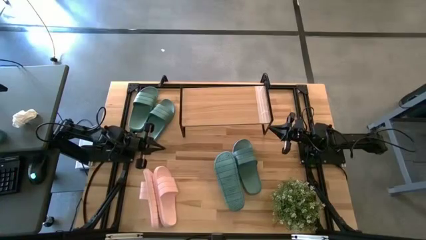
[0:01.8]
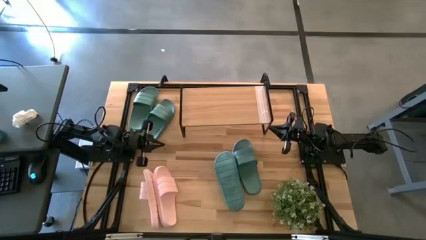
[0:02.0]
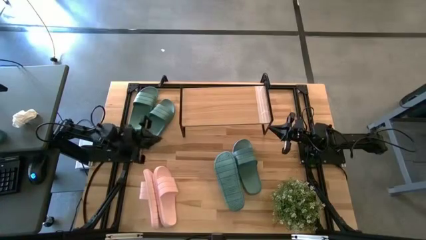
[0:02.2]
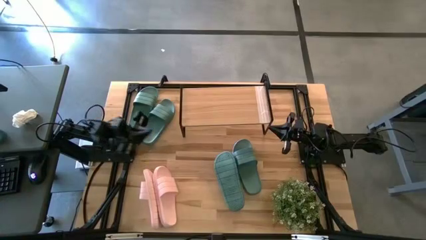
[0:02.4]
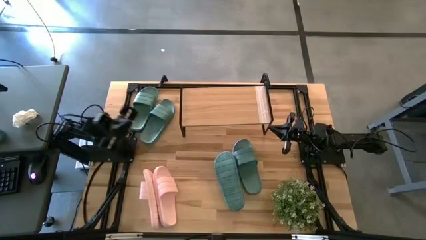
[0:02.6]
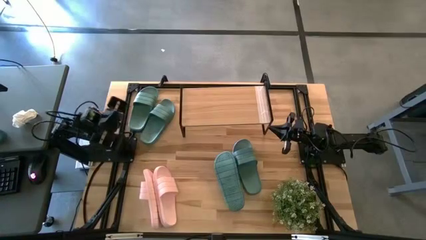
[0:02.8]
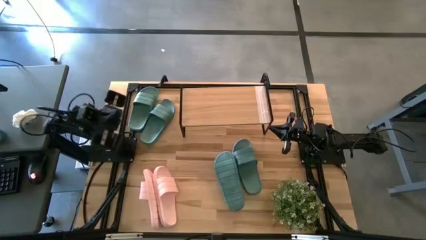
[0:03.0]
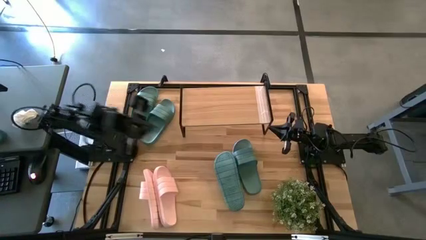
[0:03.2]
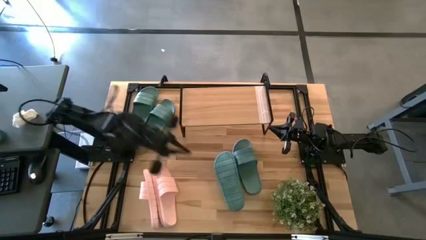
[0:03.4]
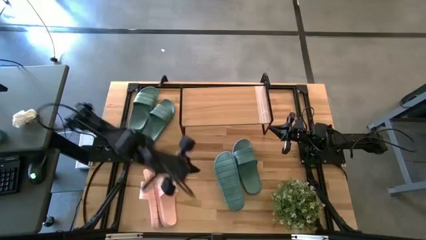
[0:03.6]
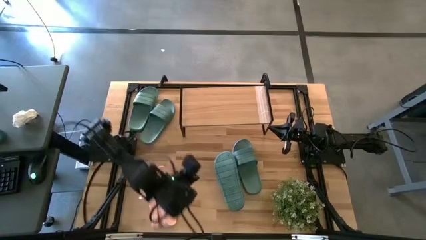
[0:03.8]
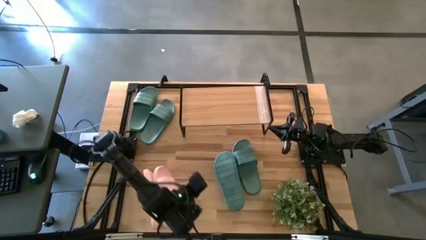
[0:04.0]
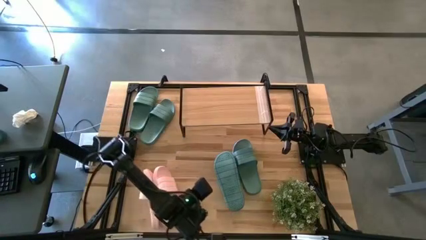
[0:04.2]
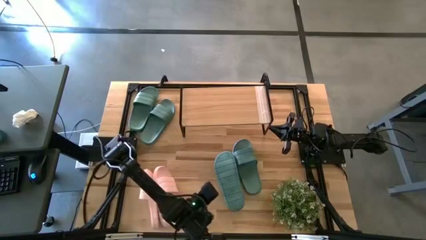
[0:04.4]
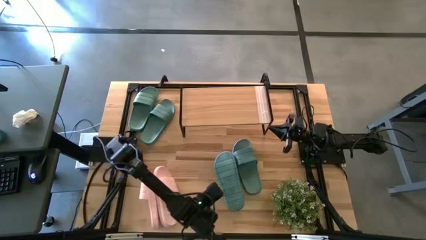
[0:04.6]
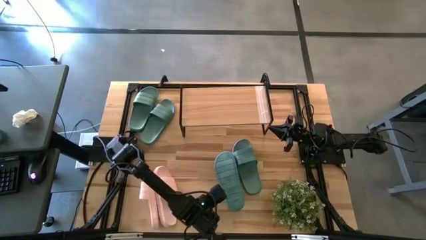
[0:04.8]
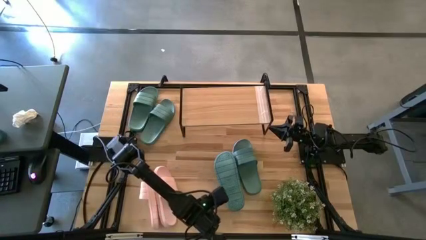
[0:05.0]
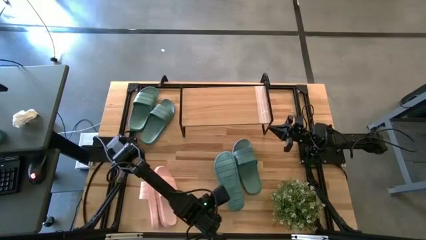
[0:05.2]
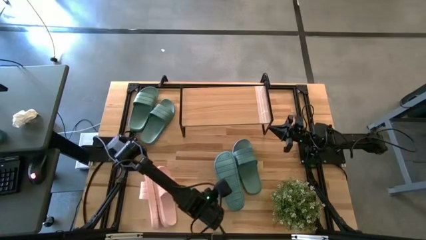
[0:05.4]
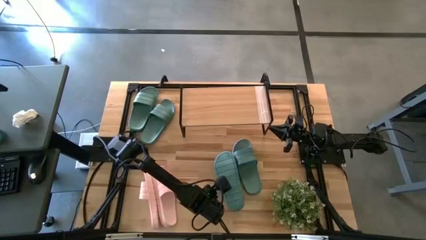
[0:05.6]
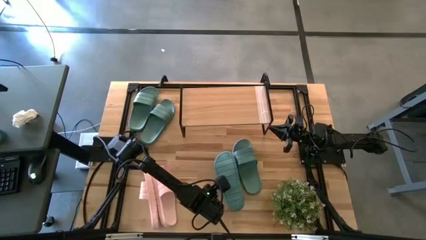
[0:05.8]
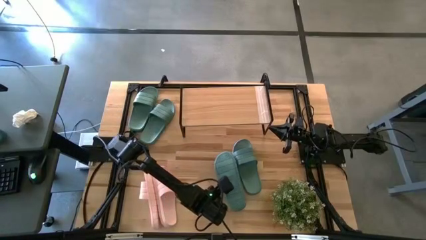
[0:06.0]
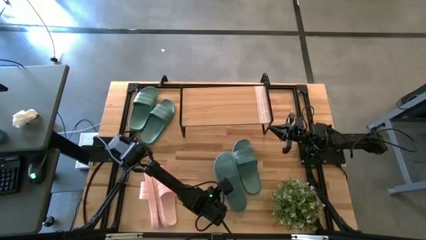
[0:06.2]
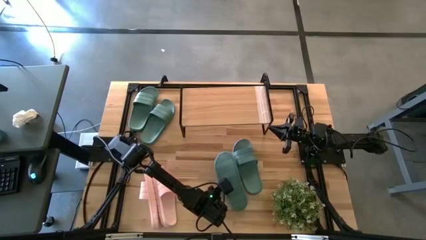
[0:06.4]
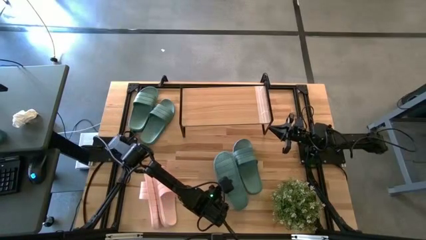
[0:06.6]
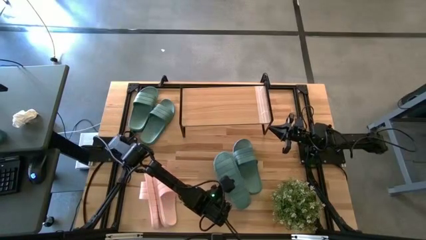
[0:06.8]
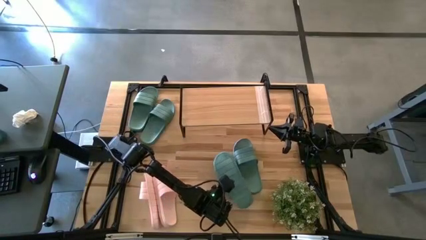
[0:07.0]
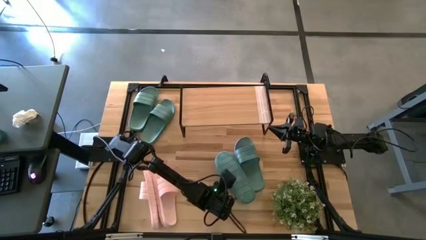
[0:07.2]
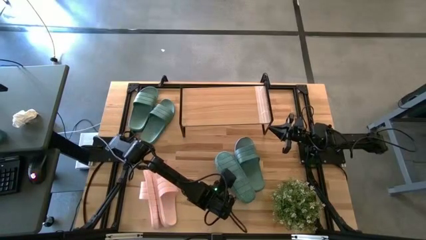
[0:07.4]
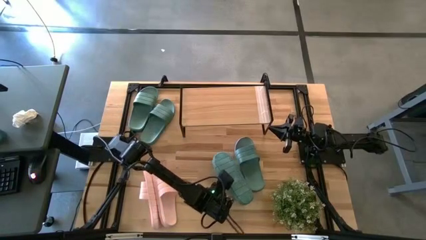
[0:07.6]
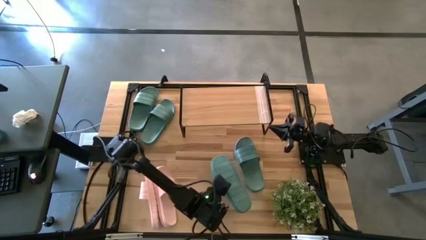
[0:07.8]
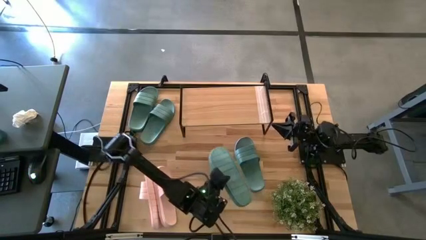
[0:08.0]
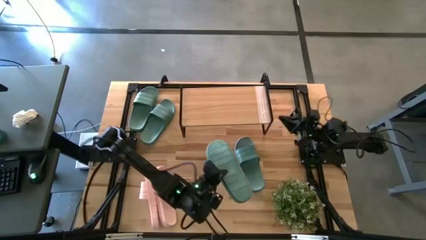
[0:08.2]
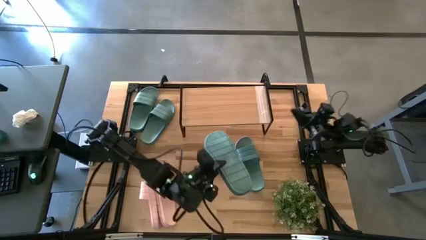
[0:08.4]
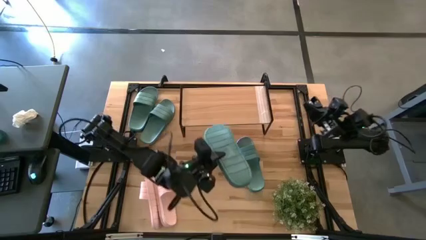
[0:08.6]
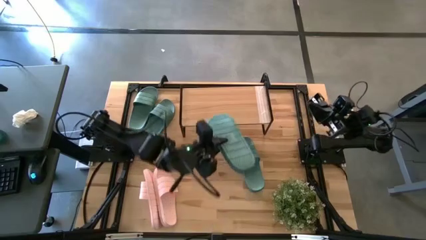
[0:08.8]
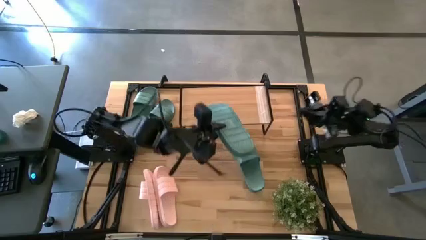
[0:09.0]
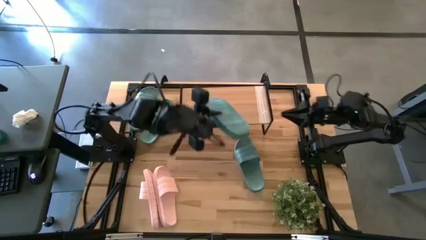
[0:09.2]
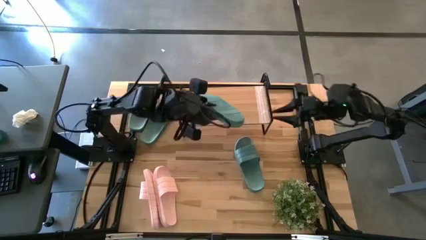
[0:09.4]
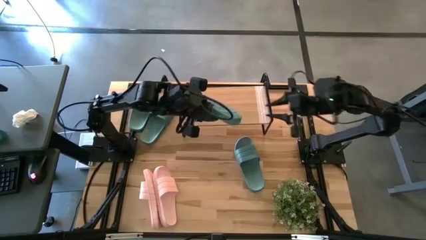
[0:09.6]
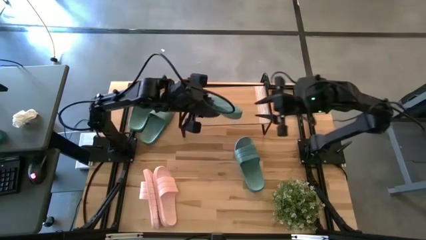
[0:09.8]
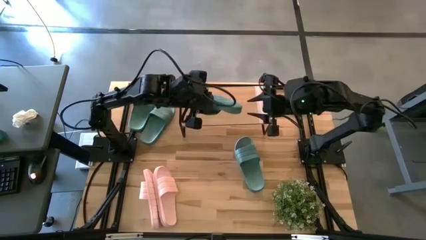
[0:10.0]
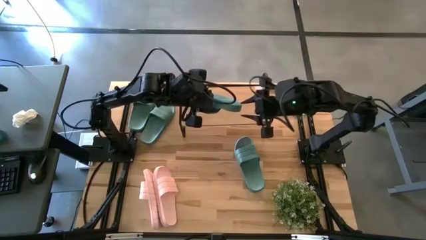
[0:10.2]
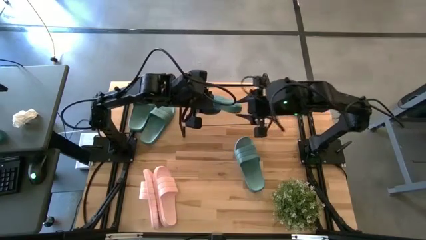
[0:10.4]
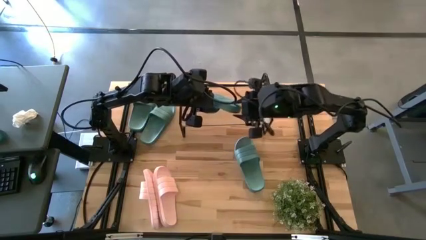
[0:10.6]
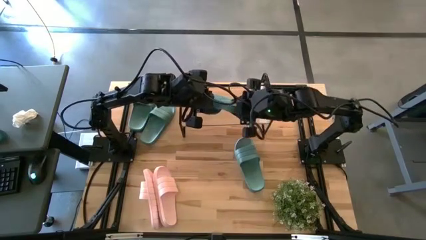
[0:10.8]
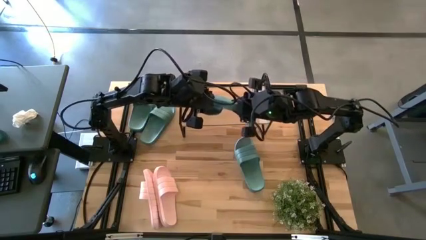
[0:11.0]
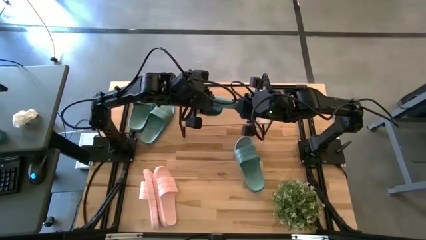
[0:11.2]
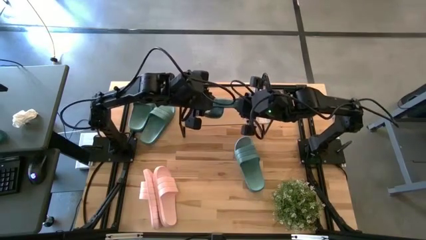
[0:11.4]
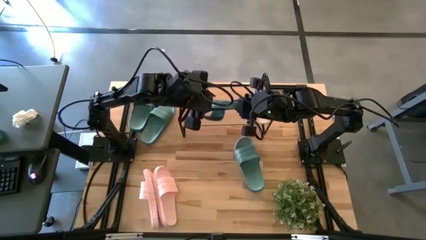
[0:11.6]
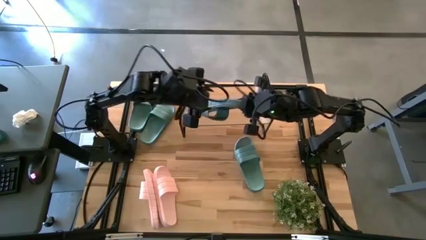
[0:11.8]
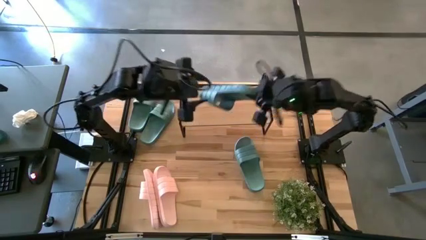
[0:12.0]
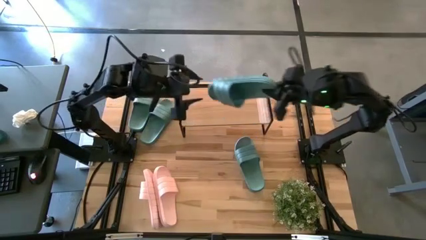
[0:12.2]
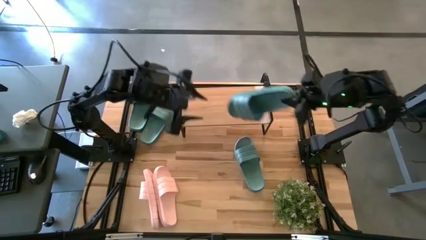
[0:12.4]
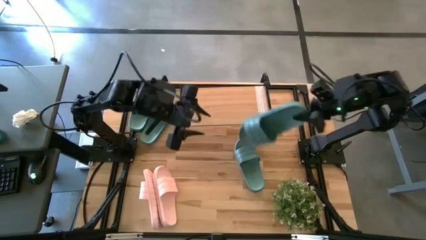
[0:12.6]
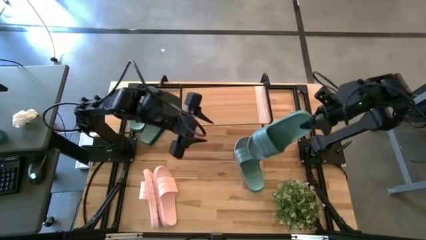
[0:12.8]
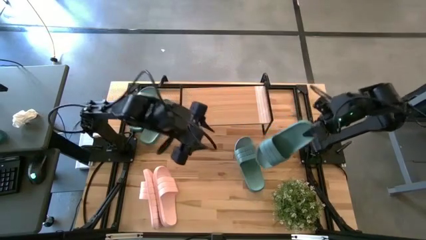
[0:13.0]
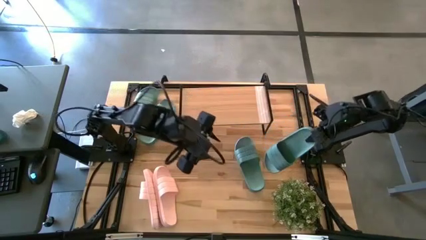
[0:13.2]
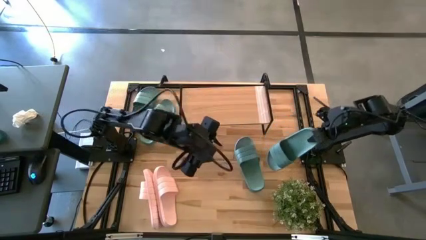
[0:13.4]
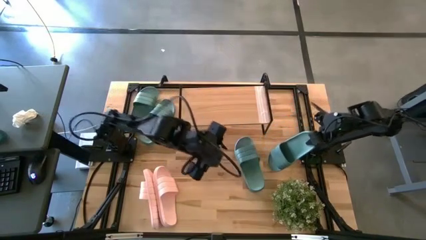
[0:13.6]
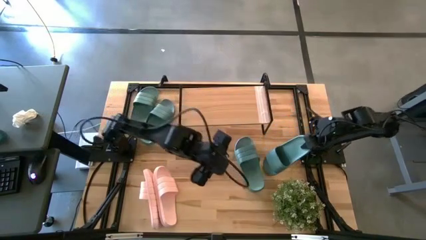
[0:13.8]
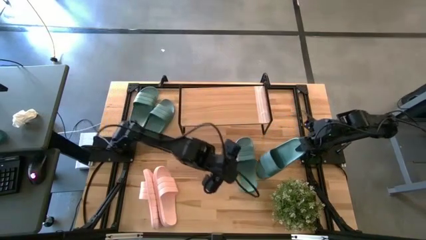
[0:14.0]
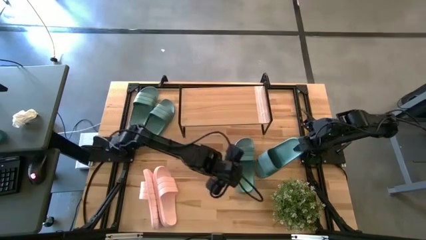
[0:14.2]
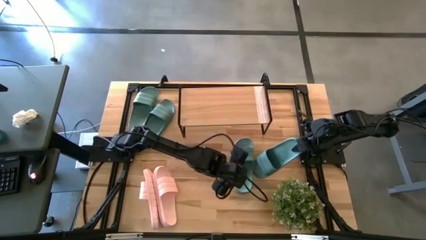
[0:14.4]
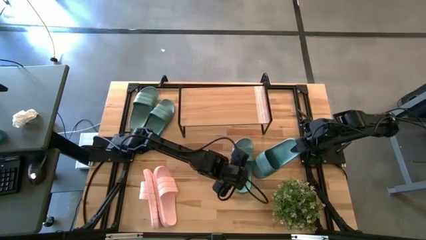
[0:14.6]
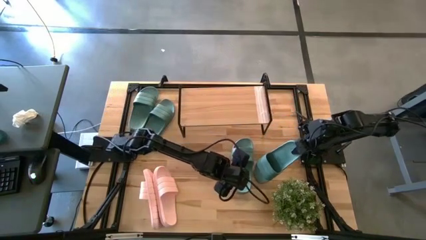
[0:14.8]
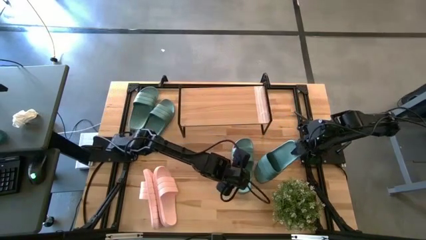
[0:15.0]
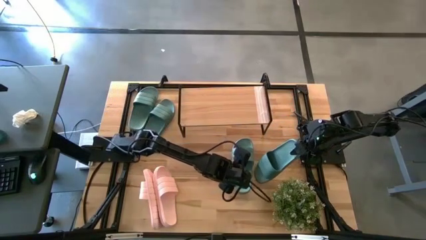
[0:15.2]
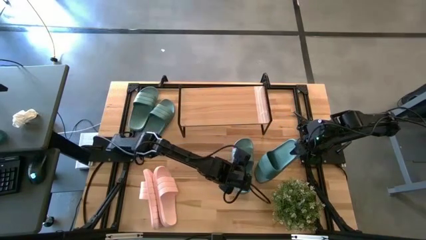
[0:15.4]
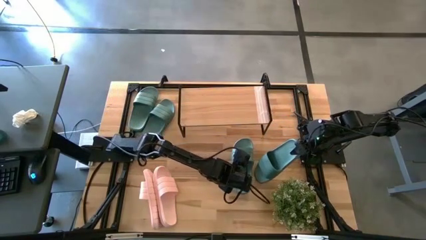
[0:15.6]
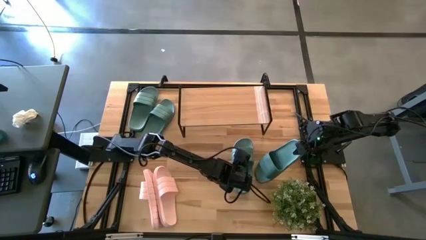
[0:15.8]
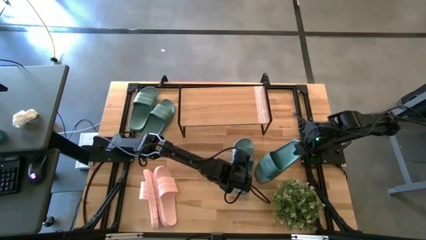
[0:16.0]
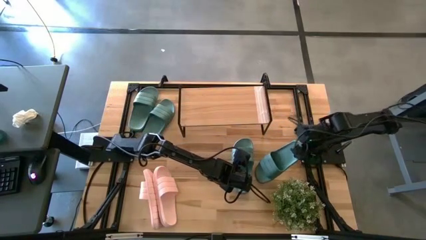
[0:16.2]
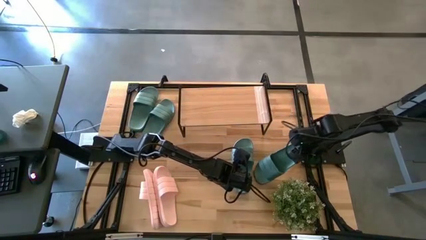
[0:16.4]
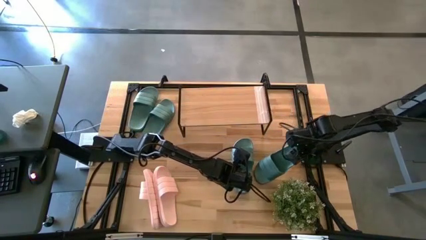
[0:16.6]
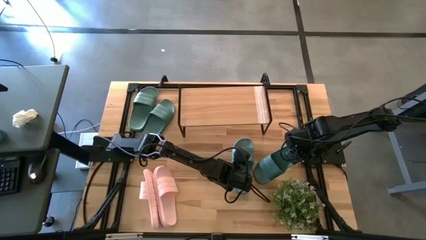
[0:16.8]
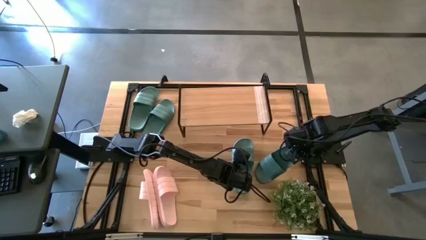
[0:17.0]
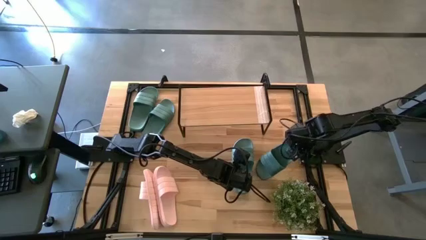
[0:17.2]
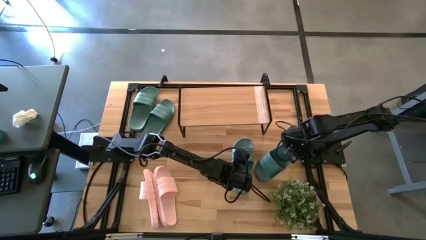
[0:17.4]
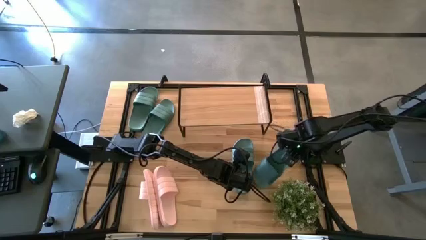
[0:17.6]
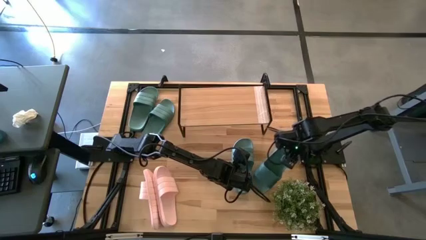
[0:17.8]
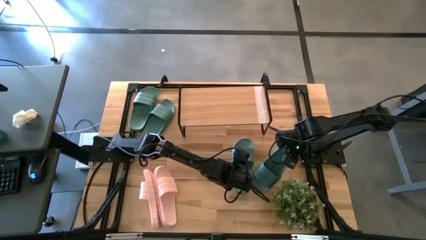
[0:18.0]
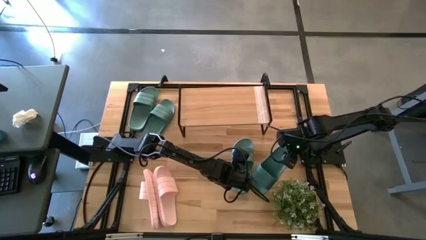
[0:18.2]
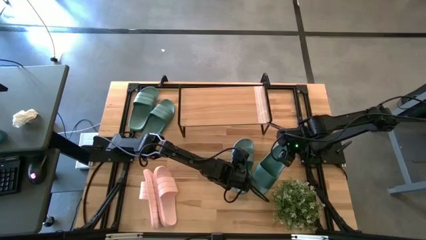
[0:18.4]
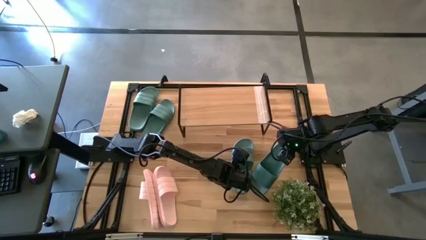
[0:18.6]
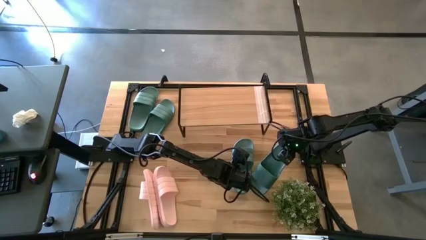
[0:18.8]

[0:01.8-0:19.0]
Task: Pick and place slides into the shelf
Adjust the green slide
